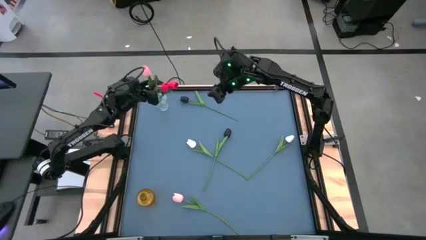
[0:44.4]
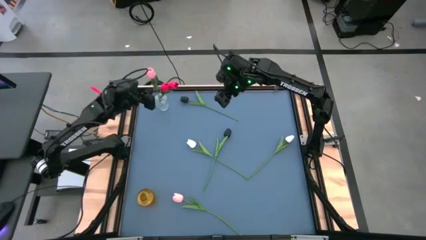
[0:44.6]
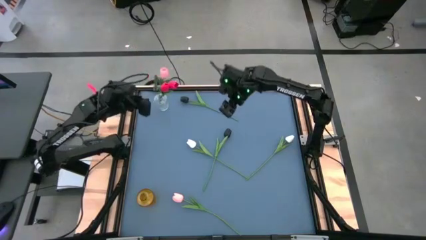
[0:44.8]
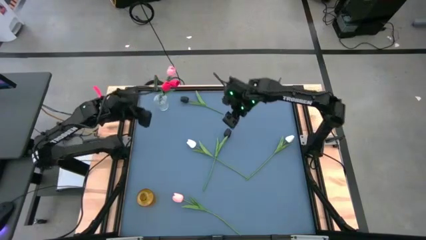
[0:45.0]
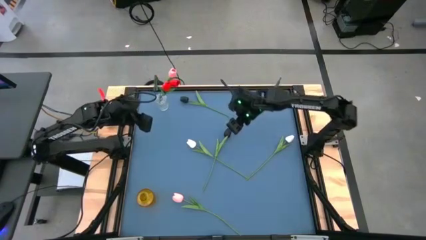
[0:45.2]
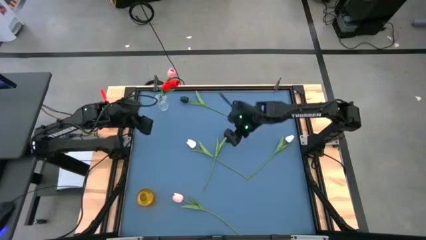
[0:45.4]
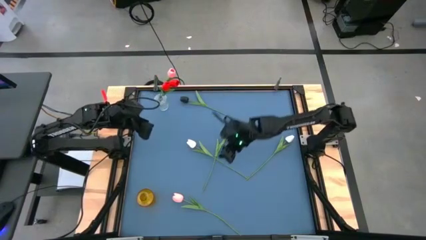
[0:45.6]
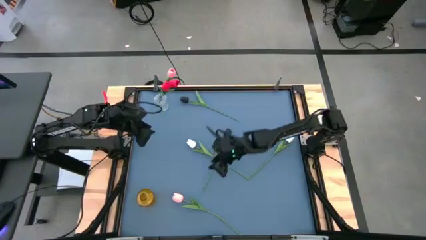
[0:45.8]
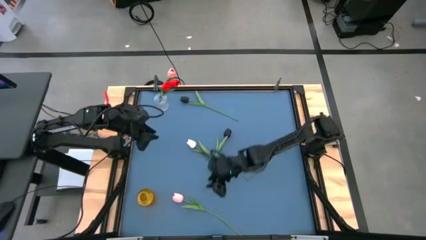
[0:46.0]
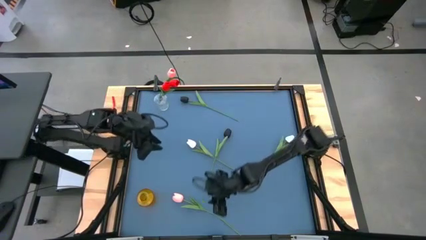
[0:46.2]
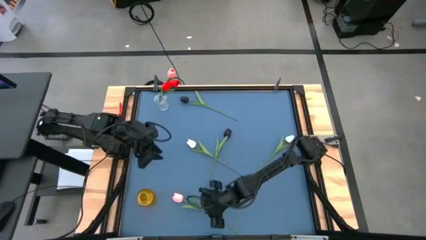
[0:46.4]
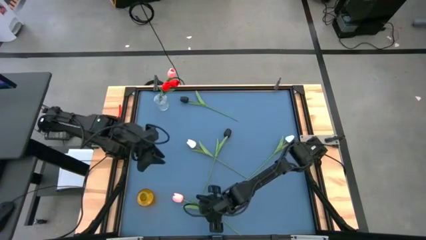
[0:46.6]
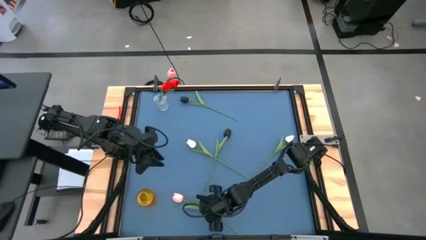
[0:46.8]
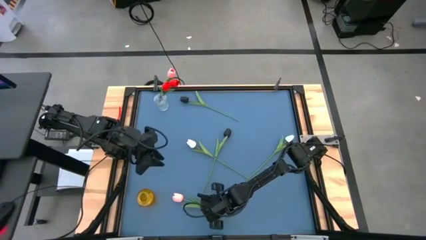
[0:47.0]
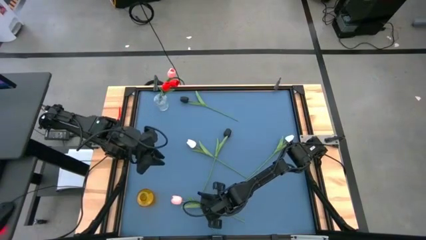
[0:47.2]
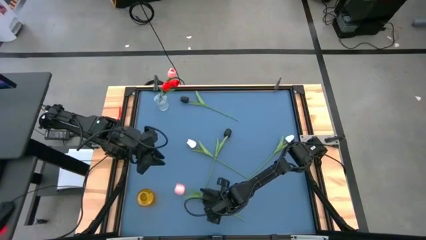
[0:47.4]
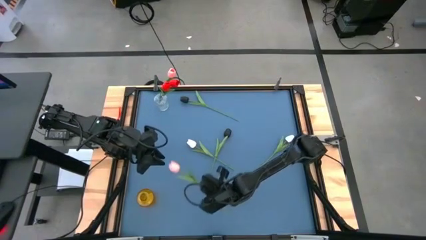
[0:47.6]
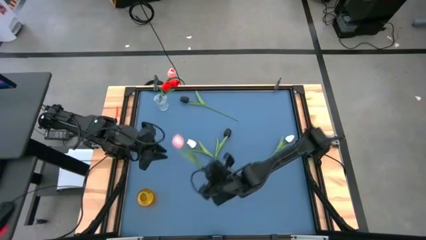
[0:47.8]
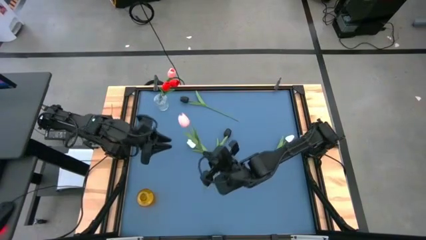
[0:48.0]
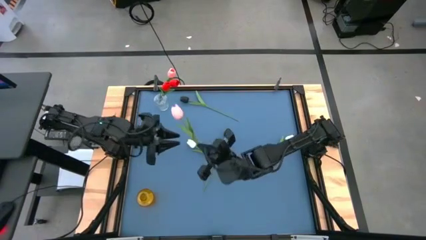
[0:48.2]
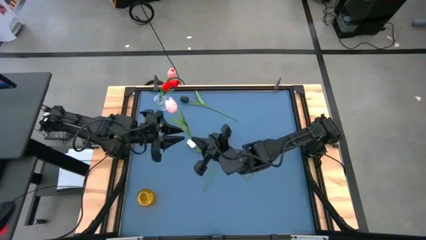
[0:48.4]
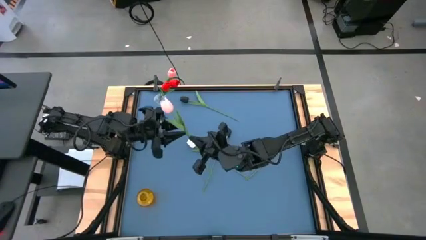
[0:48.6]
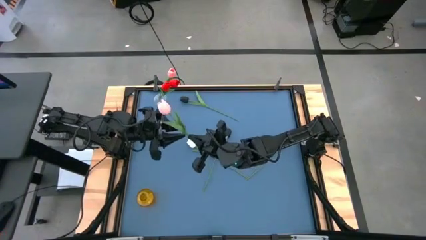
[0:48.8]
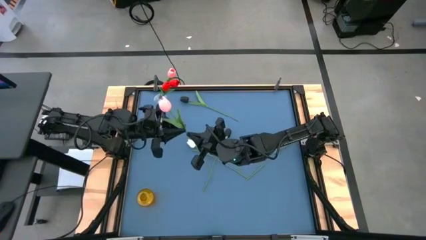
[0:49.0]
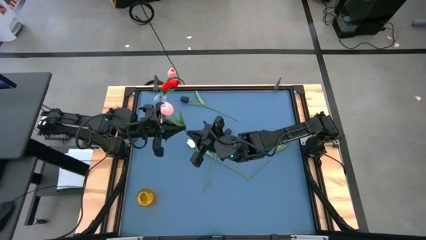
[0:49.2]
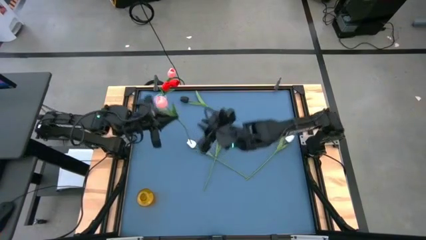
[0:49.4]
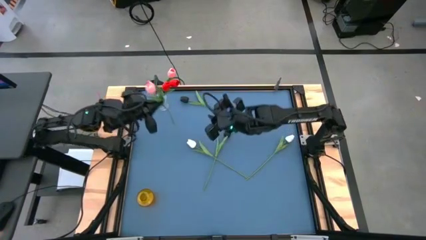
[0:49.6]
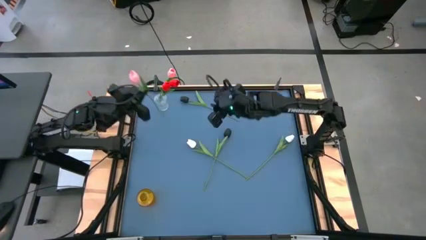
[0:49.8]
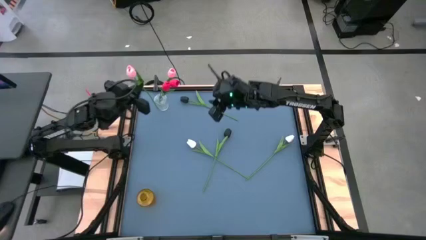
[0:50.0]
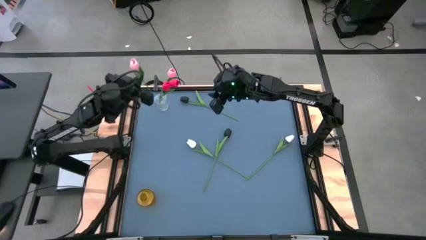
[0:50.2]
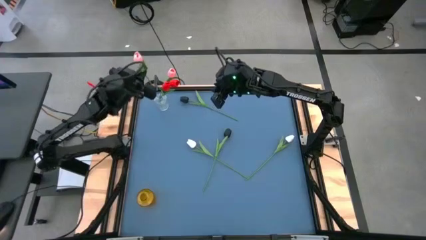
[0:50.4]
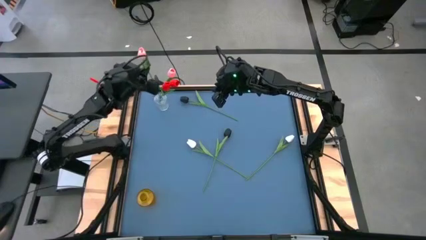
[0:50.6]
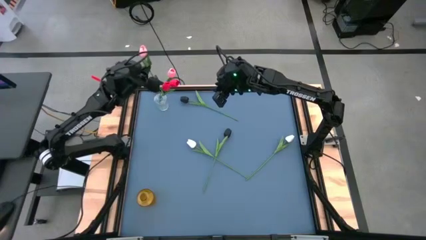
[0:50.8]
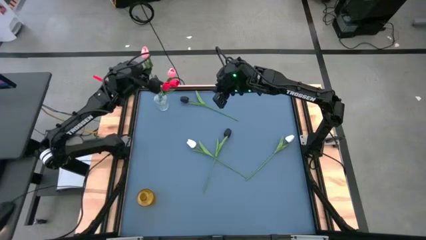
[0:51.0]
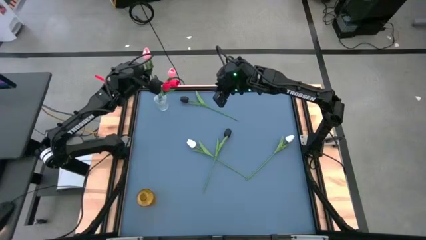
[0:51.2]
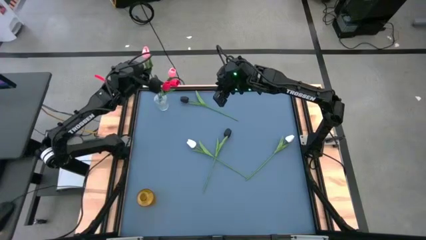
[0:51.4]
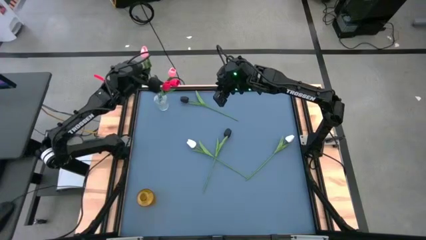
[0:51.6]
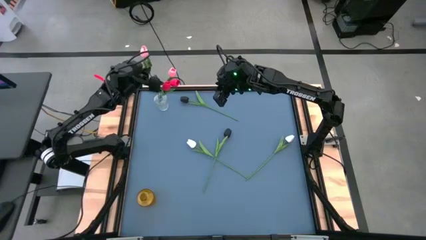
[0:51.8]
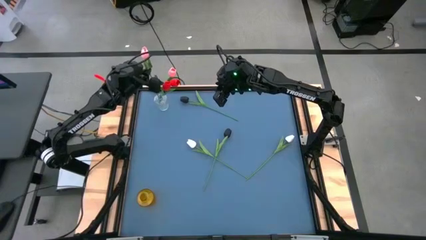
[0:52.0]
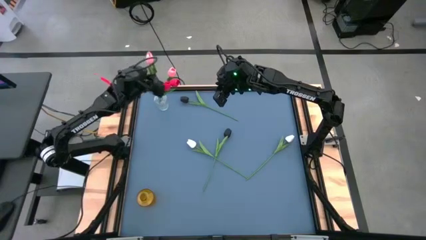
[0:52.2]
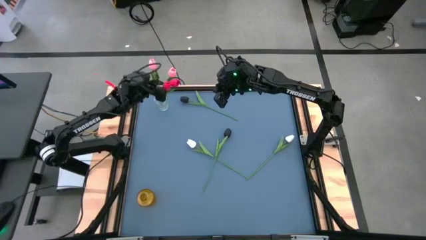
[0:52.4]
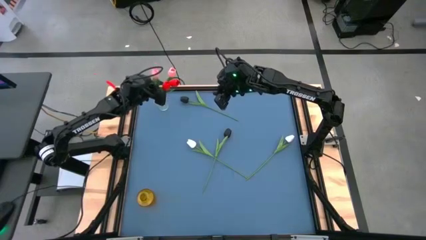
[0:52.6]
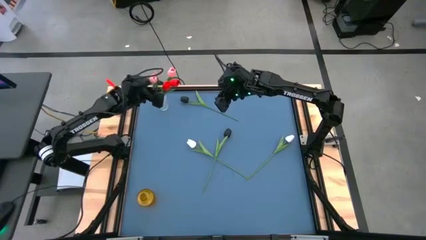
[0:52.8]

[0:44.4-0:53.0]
Task: Sort flowers into vase by color
Put the light pink flower into the transparent vase

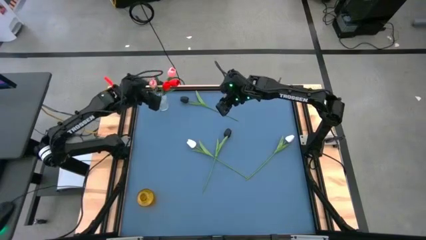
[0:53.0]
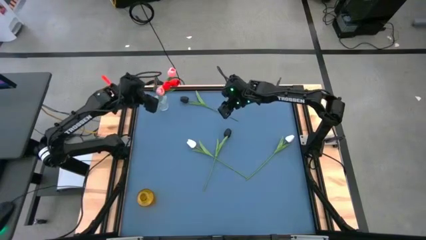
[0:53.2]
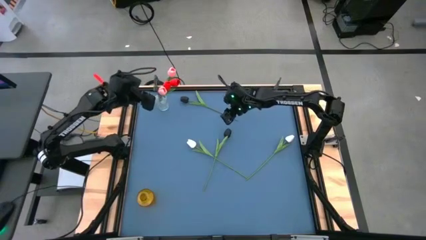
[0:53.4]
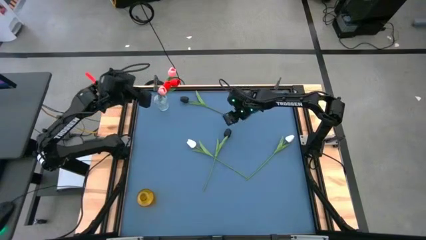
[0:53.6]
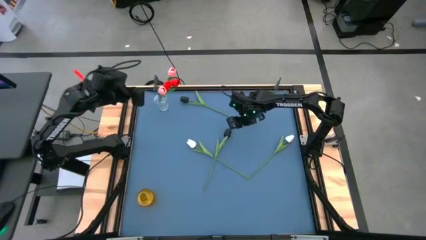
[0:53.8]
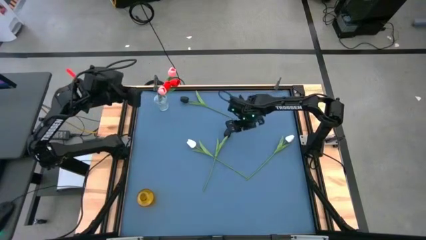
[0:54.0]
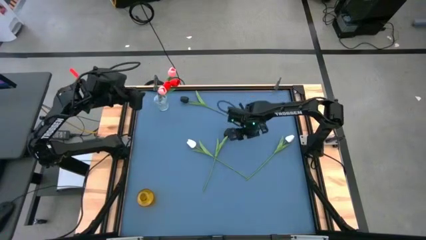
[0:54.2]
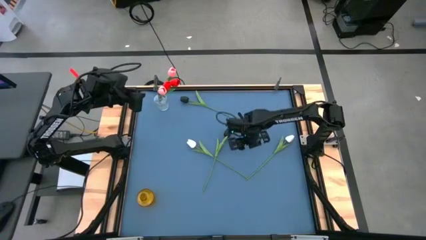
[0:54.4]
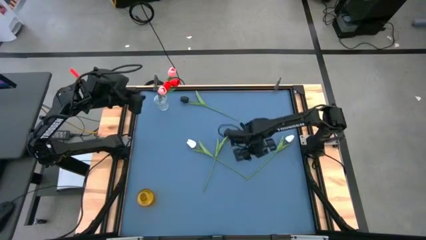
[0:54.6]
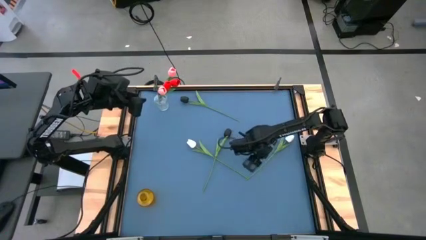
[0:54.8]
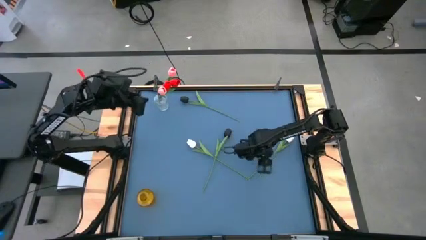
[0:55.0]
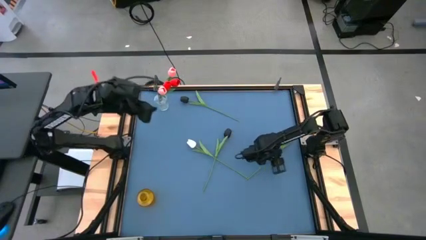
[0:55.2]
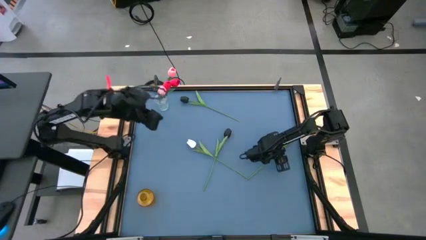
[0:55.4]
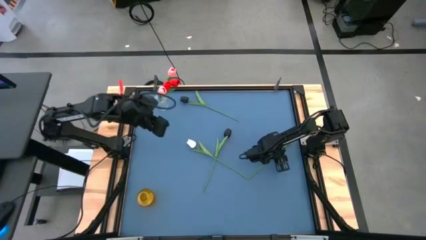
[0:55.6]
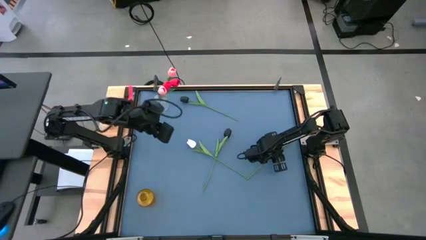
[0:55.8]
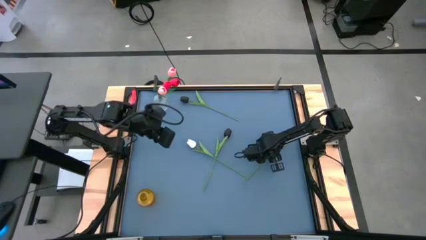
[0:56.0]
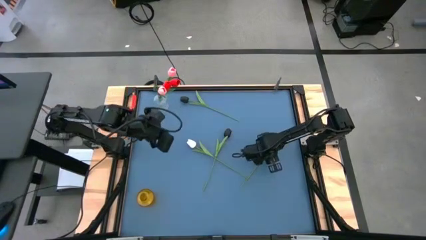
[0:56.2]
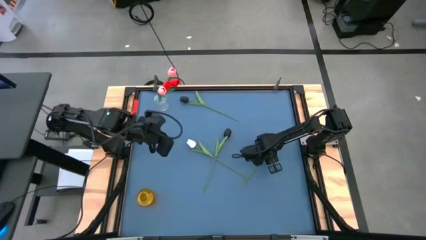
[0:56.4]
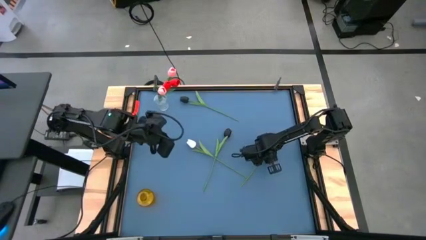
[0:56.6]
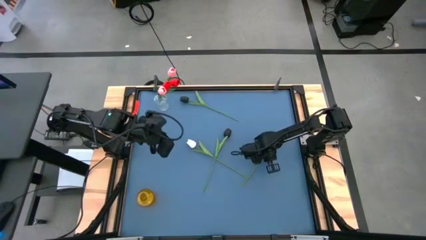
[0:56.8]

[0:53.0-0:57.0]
Put the right white flower into the yellow vase

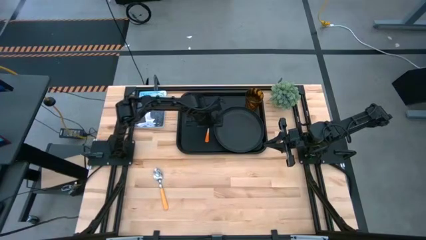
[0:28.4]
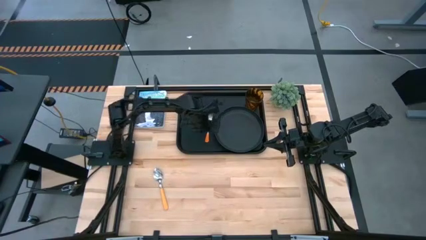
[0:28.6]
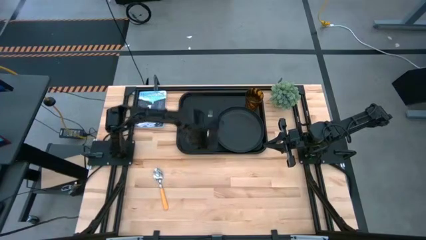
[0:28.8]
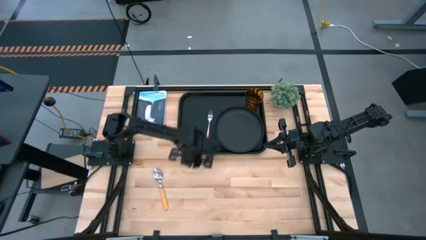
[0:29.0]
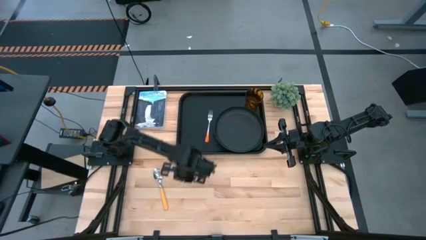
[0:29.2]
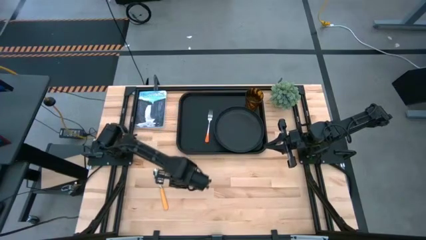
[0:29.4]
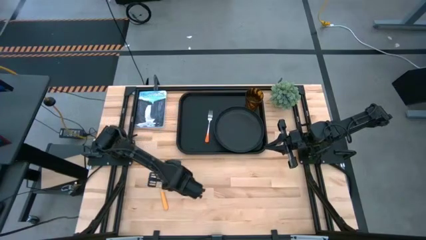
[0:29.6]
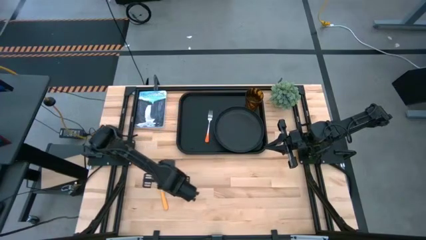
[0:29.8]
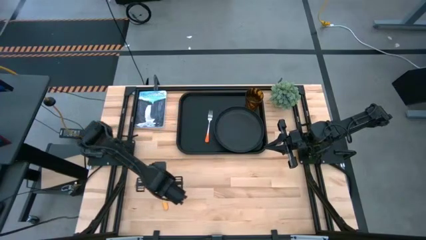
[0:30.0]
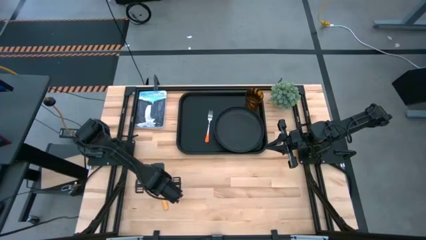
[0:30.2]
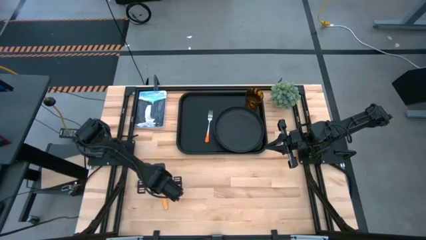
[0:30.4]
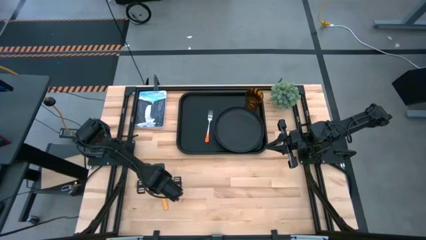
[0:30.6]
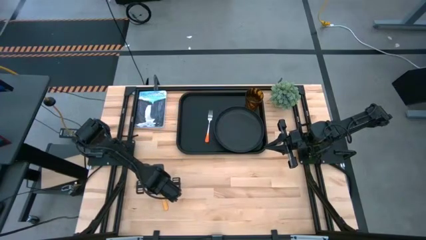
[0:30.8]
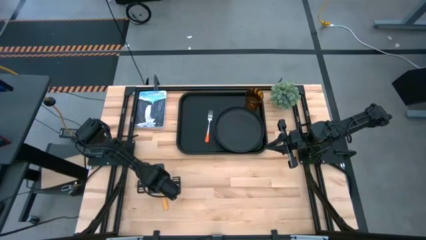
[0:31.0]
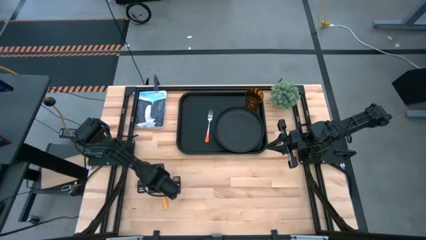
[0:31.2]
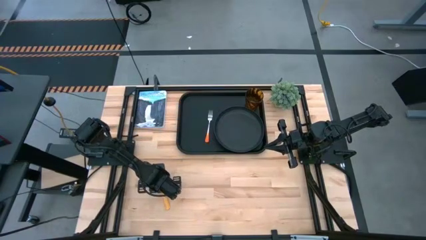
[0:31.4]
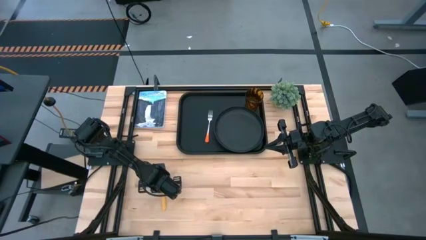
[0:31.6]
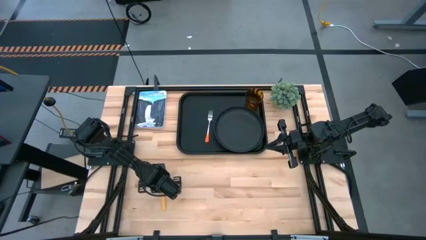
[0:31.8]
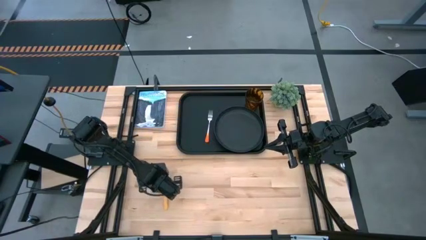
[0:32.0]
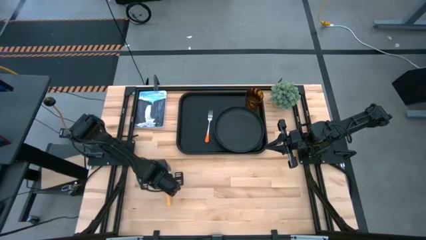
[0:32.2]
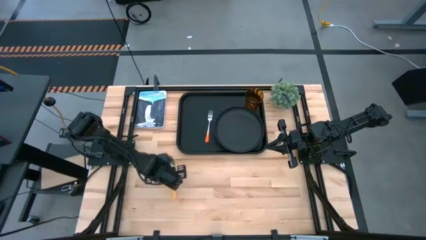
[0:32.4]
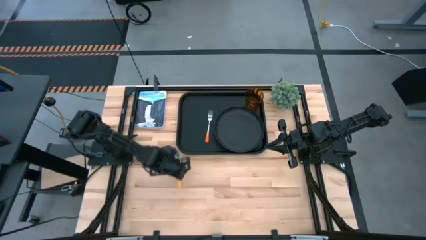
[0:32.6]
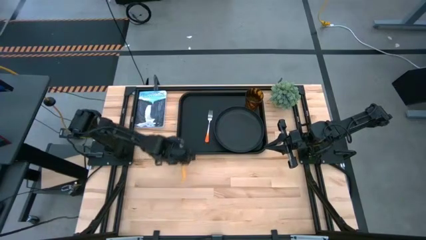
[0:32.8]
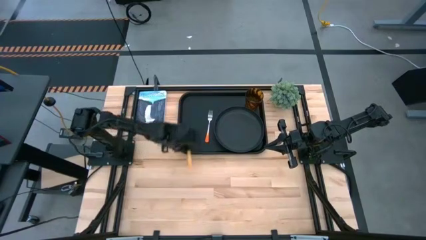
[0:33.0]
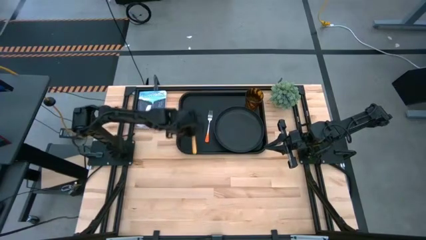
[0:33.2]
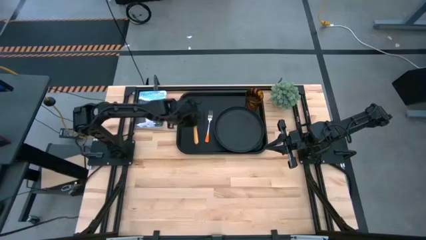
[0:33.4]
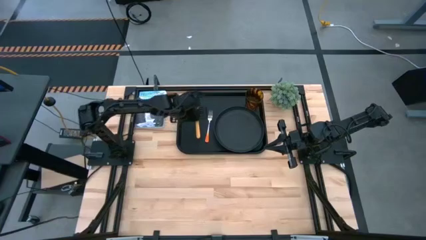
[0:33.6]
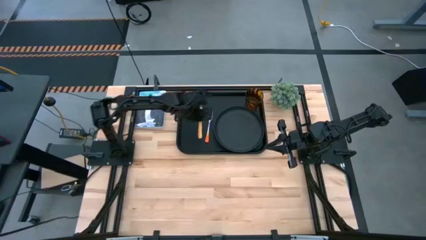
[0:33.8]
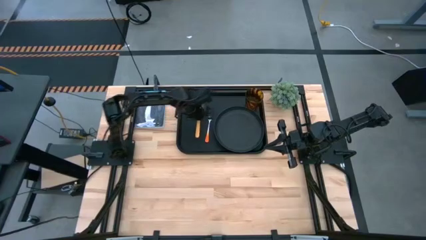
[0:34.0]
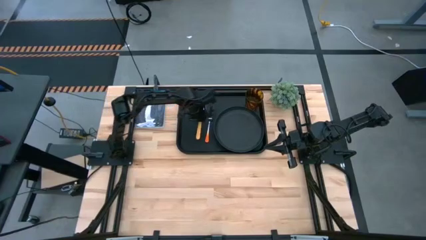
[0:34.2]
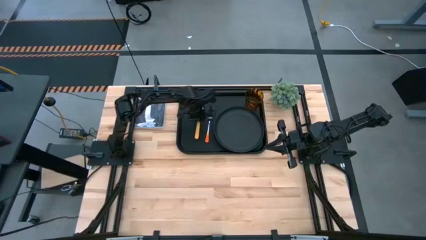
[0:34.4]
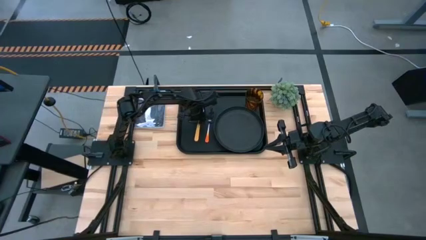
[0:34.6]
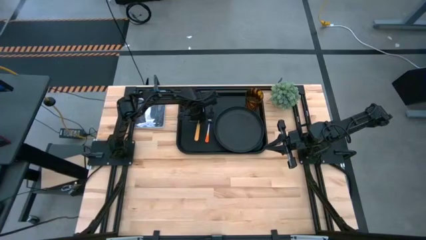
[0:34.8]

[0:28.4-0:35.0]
Task: Pick and place plate/cup/fork/spoon on tray
Put the orange spoon on the black serving tray to the left of the orange fork
